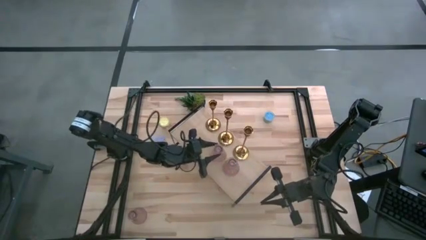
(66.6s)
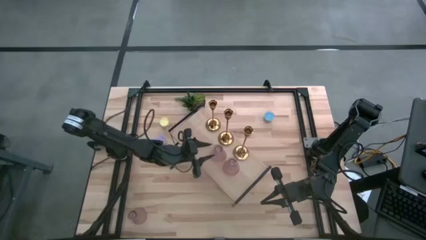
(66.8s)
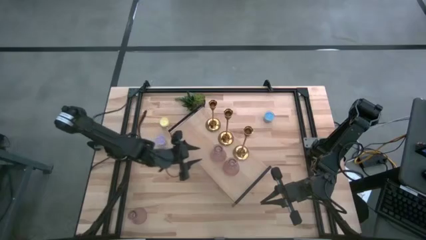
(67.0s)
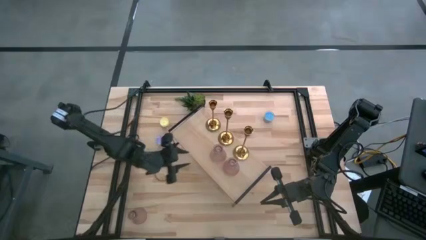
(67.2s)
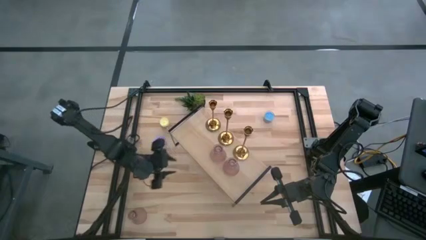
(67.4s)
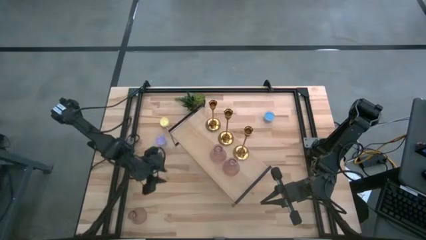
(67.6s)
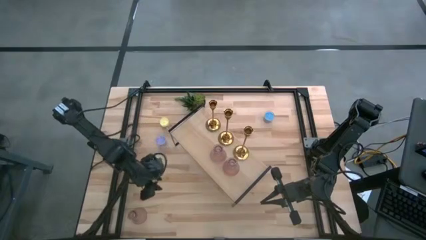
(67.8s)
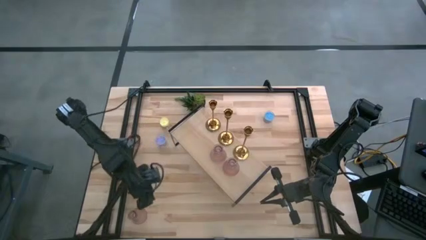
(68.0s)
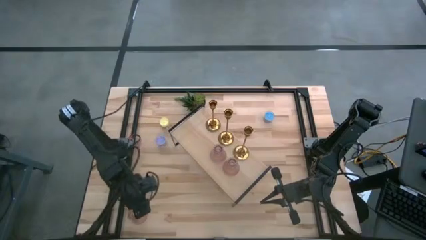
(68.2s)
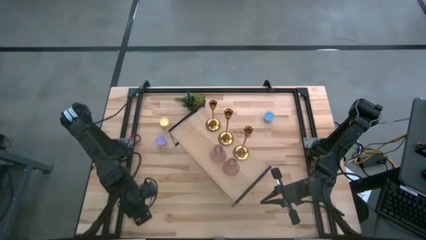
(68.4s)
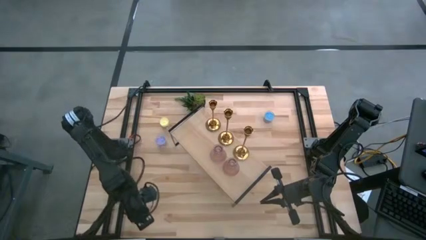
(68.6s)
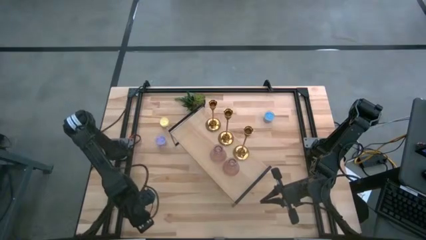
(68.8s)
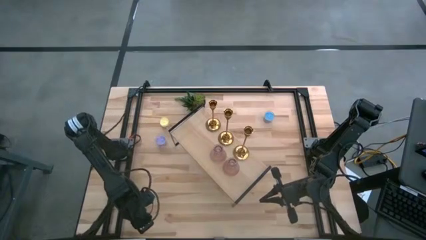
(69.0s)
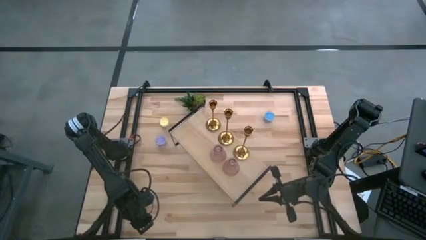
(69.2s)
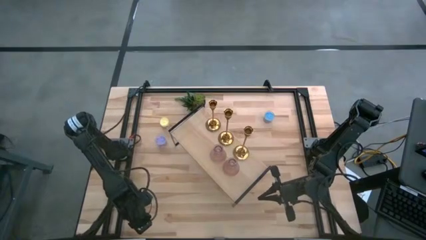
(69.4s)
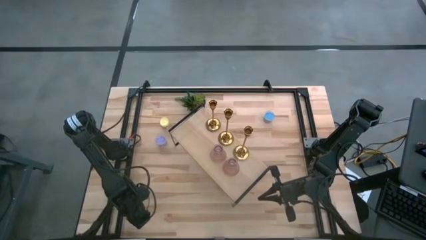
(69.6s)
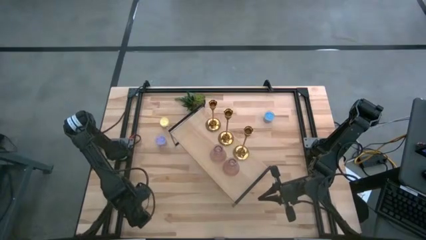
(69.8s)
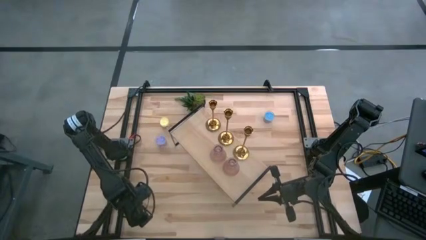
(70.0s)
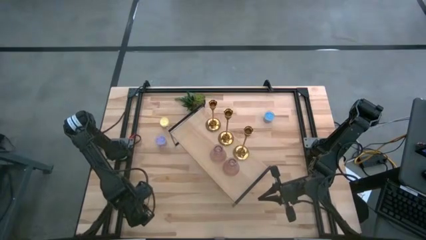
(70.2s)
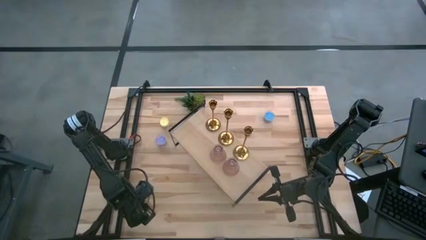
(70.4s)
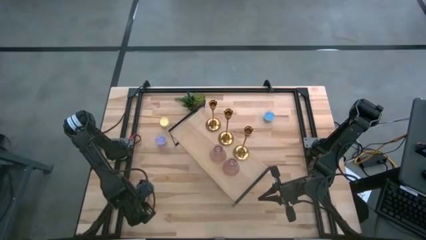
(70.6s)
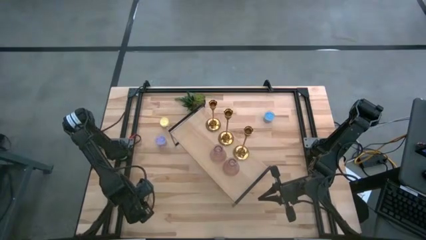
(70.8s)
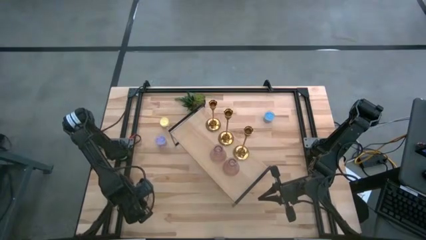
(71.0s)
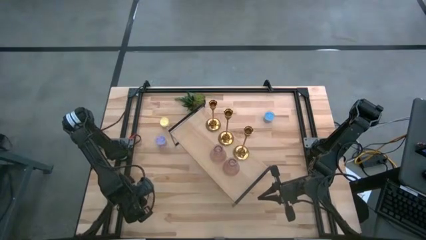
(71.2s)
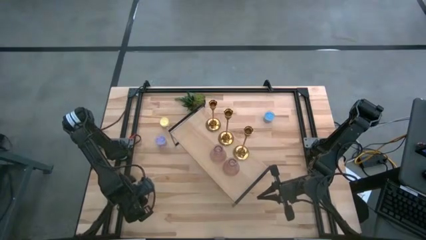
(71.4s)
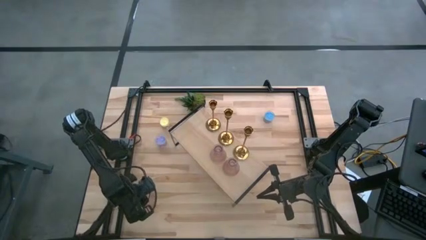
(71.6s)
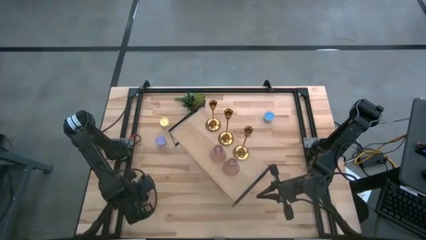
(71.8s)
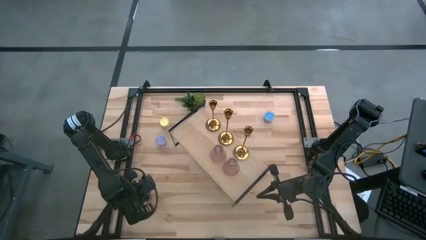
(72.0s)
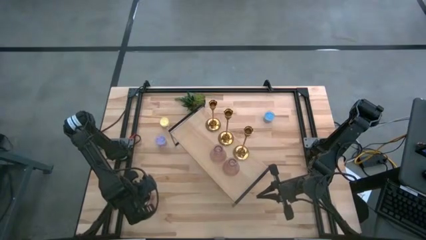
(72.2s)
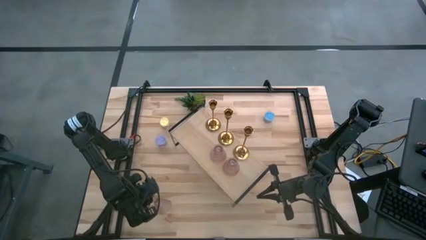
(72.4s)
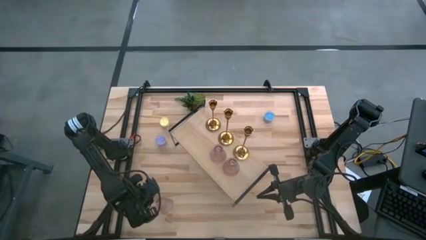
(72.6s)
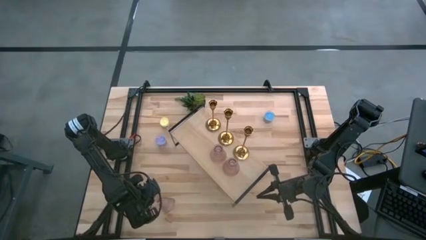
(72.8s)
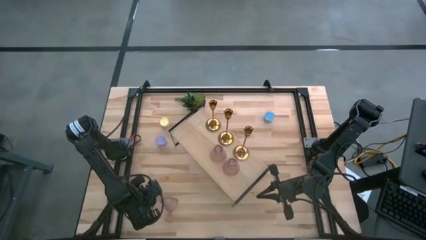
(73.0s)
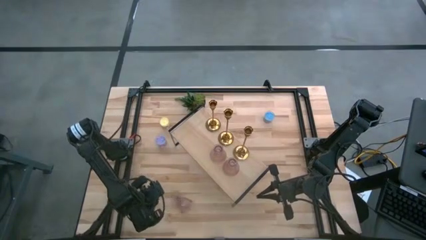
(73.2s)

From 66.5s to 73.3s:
Task: Pick & Place candle stick holders
Put the pink glass candle holder on the shelf aligned with the other pink glass candle holders

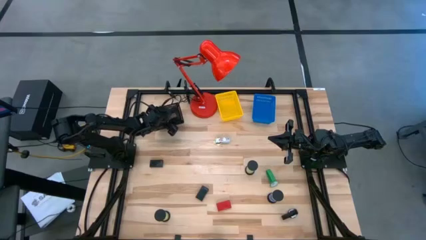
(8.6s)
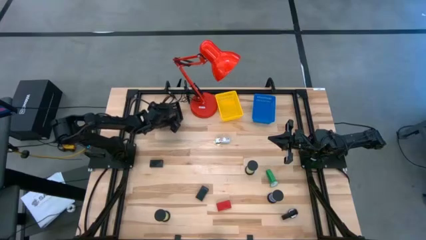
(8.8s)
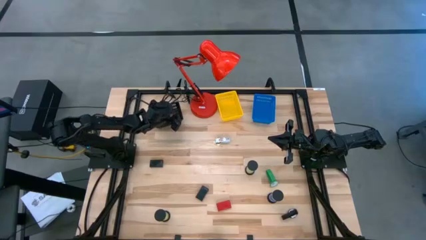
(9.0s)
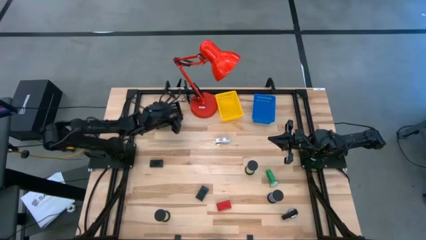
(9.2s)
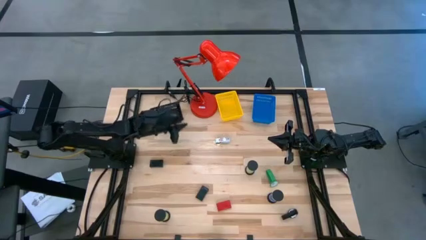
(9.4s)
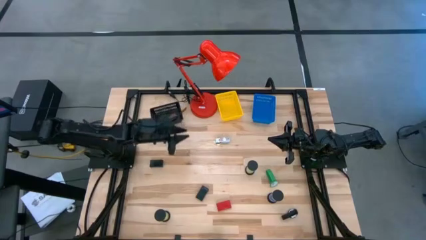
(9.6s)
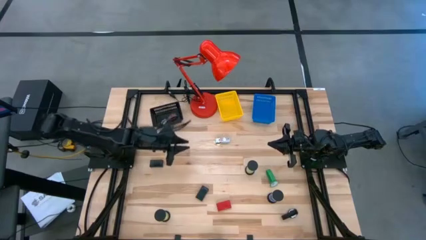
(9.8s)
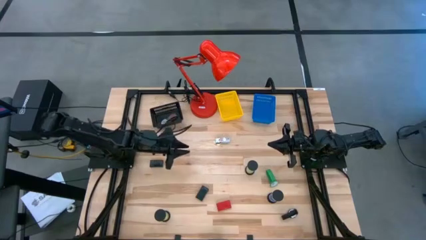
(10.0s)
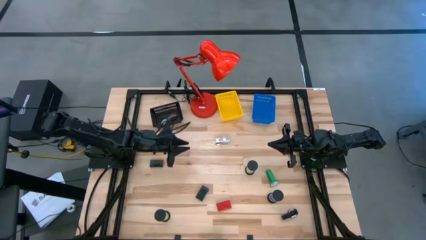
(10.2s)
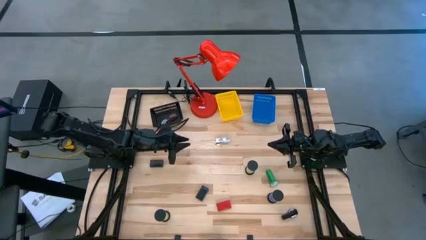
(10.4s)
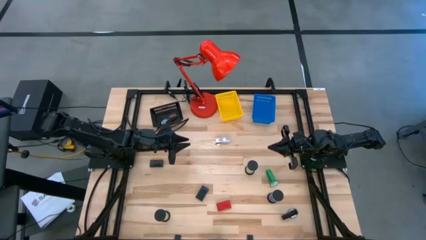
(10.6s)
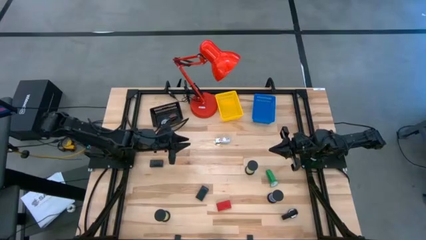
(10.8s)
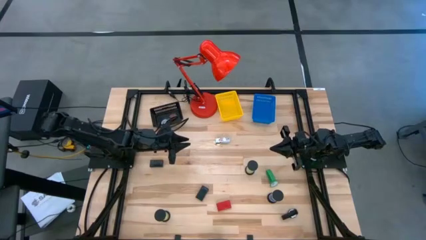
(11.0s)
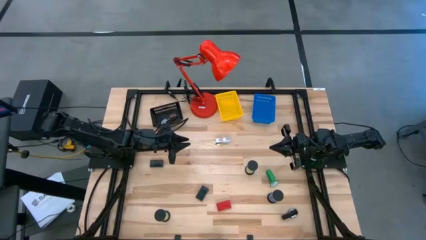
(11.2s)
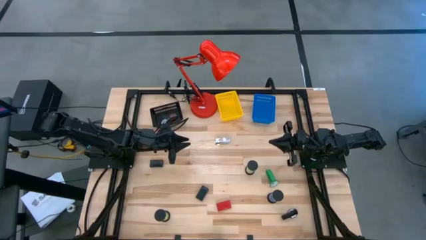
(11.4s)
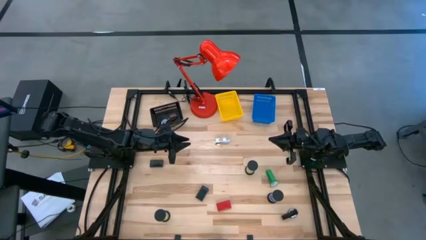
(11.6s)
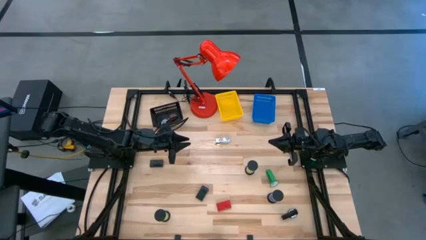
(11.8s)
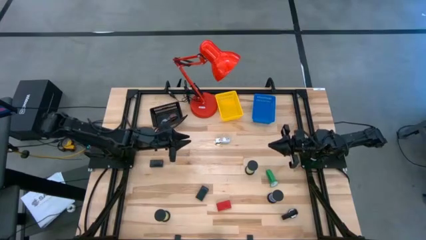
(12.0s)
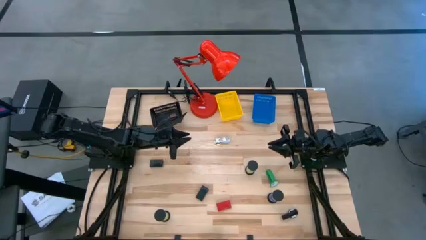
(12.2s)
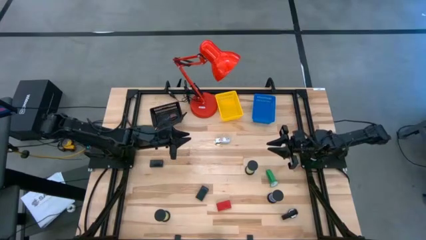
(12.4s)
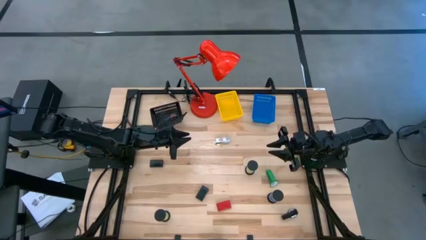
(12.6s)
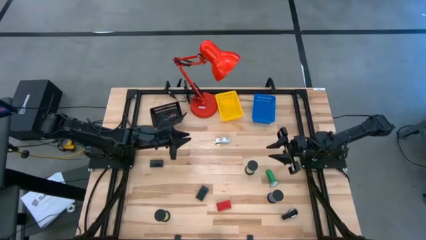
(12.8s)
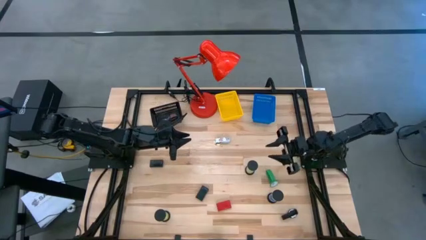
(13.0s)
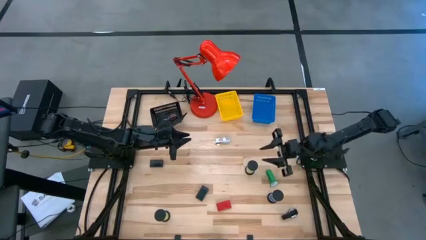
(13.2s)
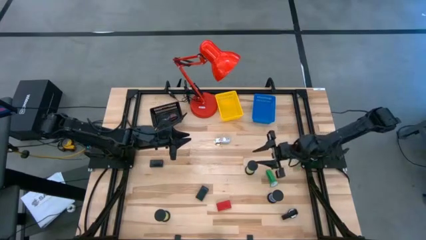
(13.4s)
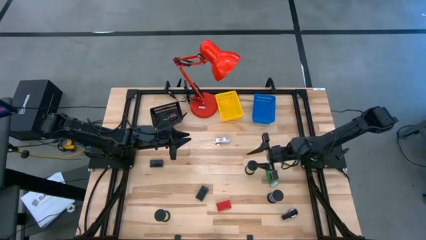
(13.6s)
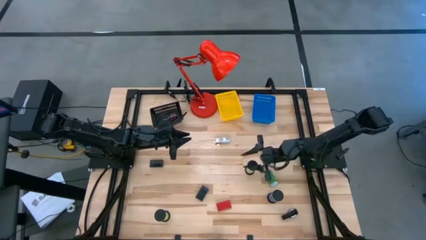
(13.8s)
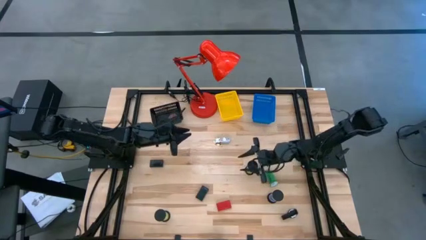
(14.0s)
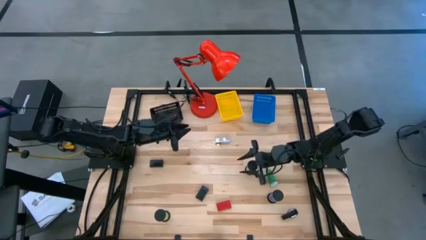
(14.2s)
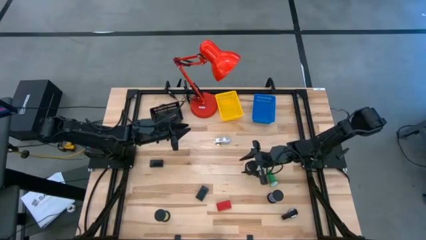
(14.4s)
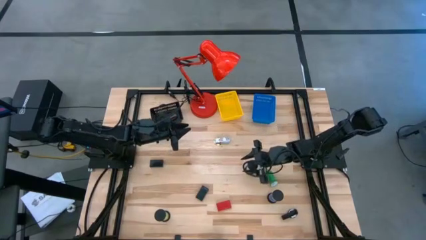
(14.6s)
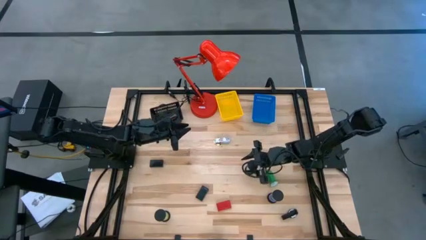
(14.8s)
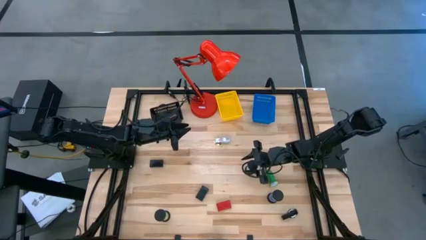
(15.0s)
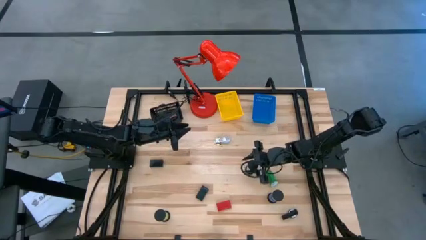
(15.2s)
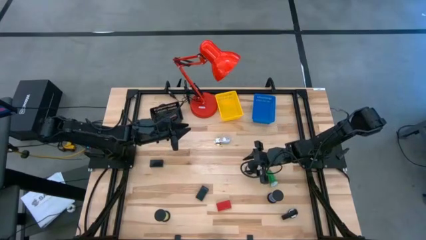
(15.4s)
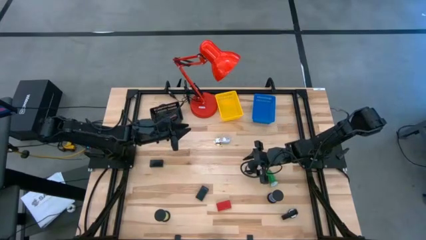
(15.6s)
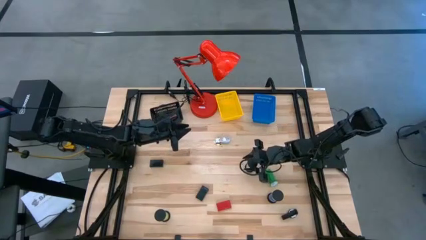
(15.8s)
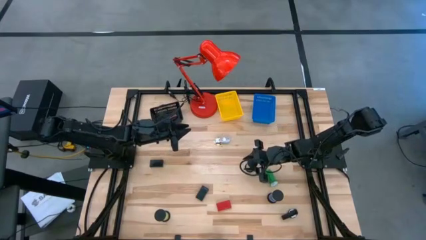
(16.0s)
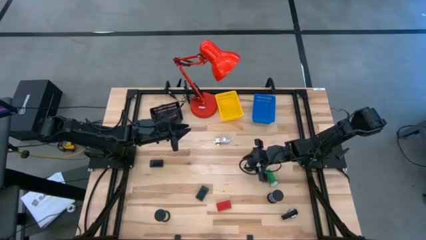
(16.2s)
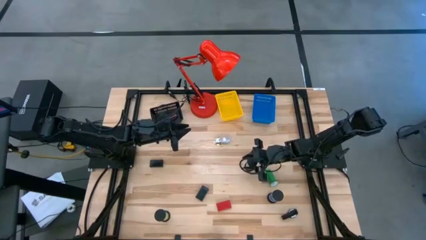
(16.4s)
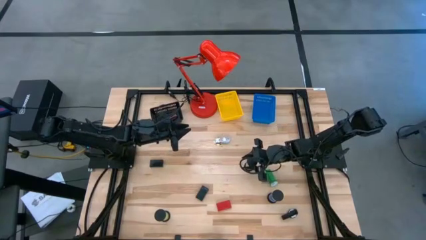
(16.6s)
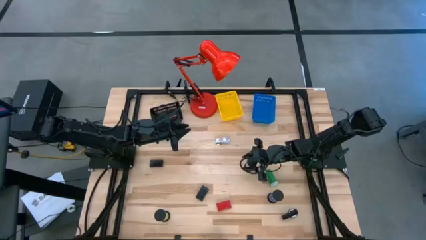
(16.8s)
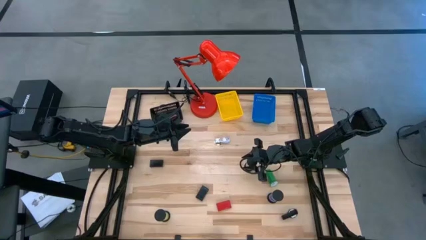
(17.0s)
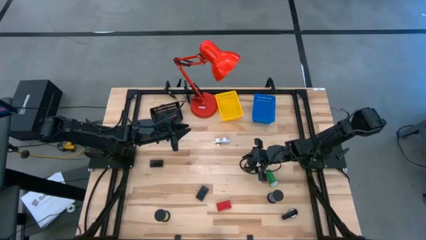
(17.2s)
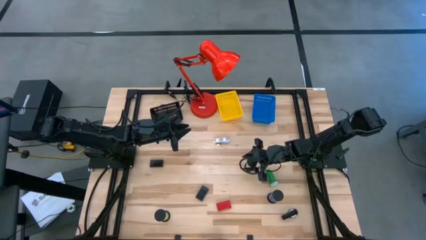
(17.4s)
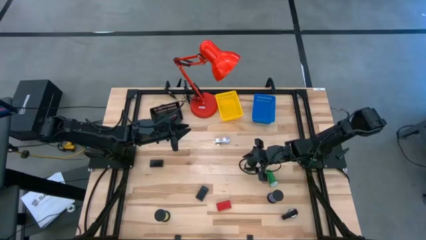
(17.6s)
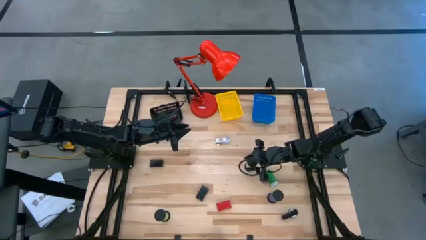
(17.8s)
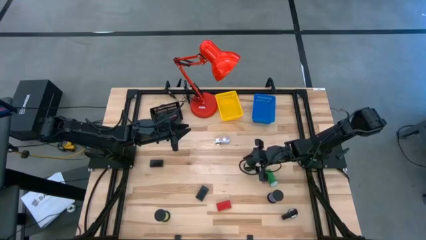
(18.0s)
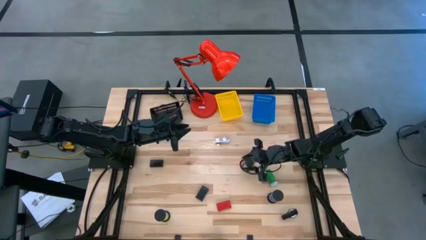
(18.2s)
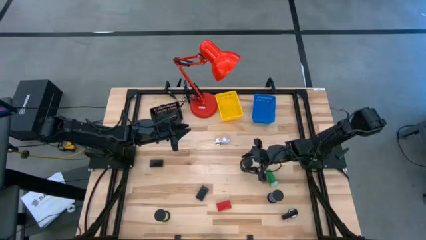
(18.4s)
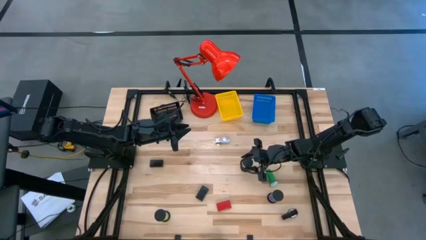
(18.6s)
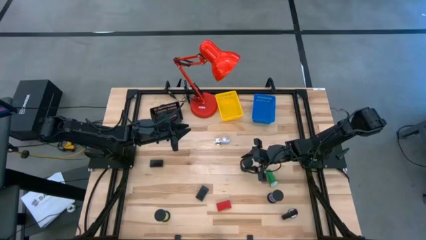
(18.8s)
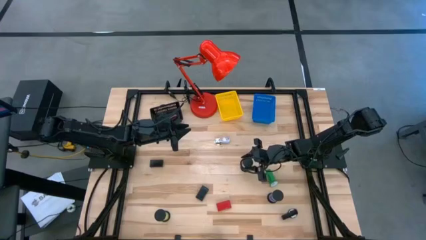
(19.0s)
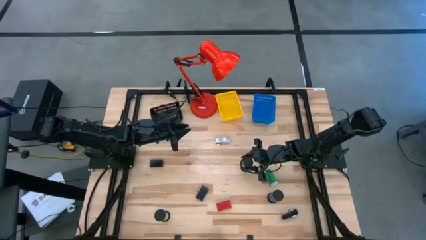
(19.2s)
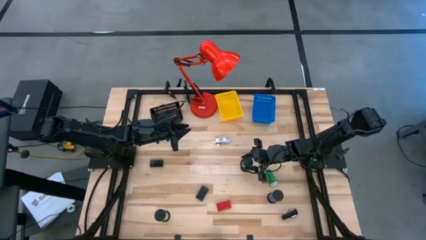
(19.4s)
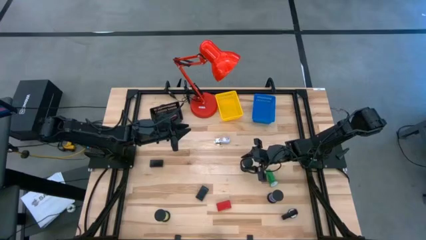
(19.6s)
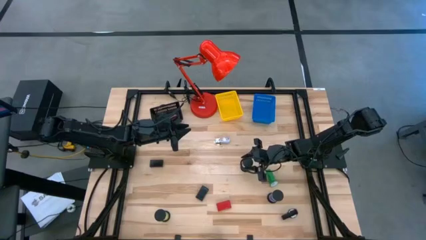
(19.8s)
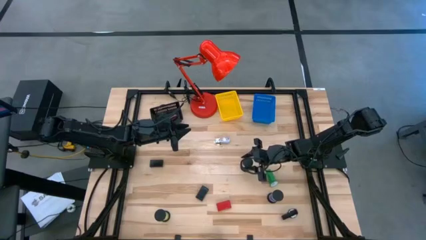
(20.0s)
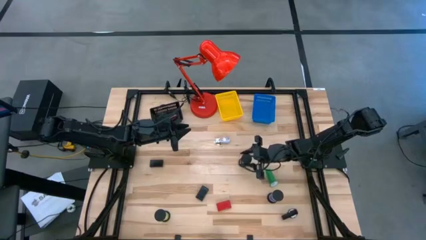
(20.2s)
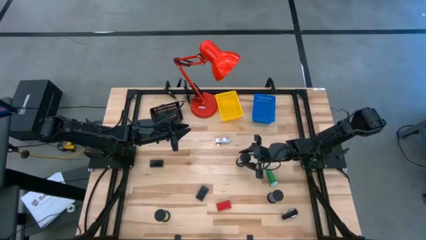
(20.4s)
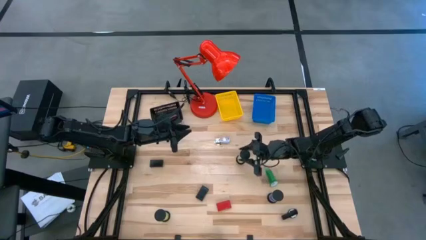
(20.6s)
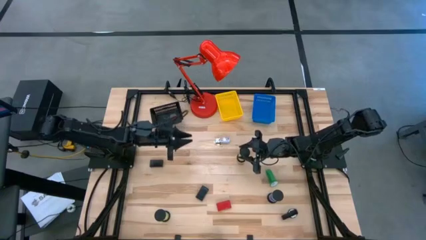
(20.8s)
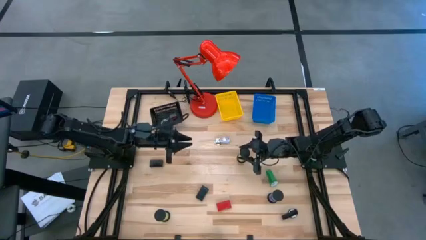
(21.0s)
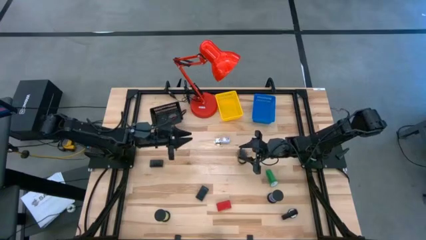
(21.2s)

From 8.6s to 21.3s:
Task: Pick & Place Office items
Put the light green hourglass into the yellow bin
